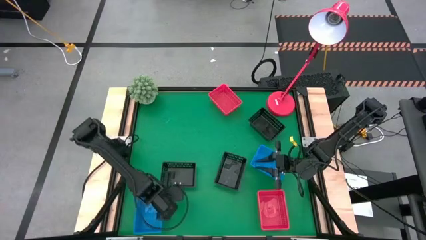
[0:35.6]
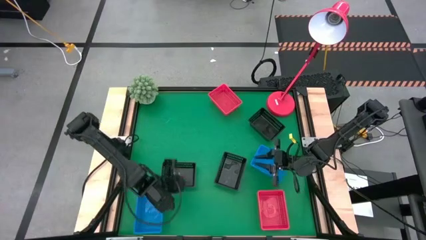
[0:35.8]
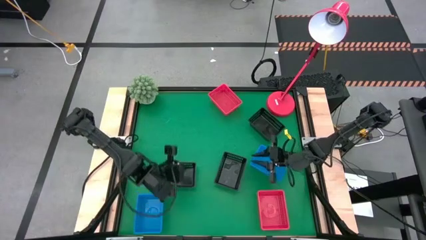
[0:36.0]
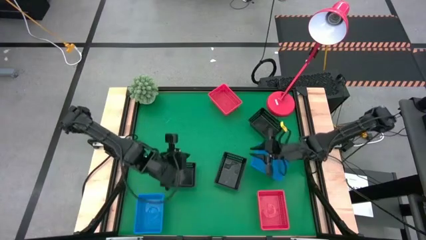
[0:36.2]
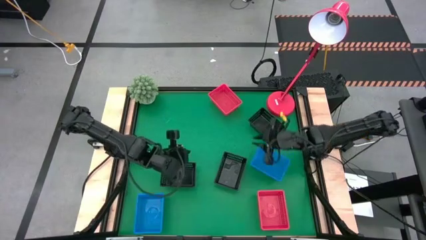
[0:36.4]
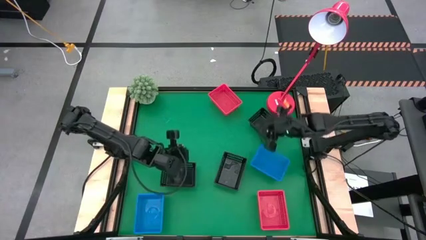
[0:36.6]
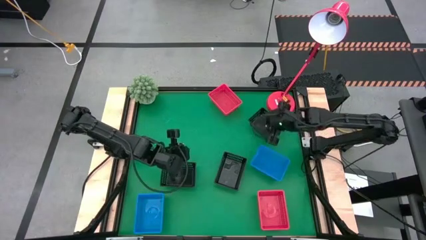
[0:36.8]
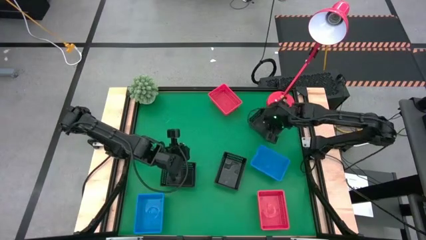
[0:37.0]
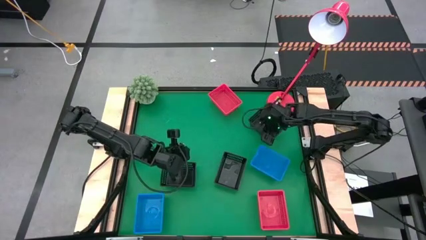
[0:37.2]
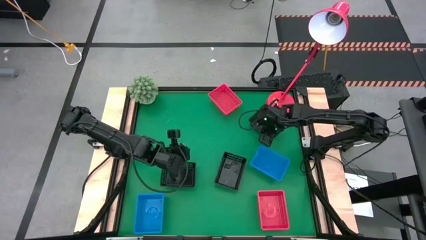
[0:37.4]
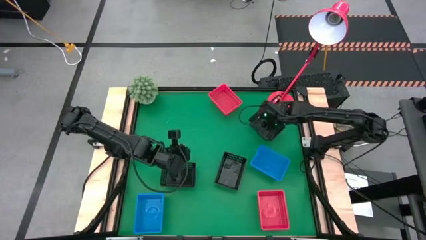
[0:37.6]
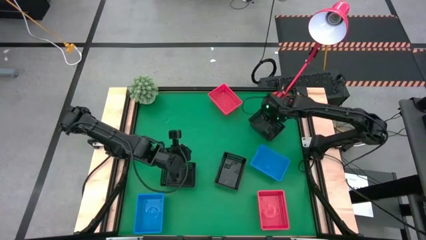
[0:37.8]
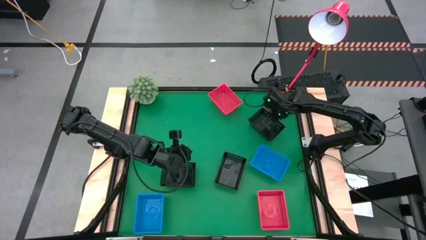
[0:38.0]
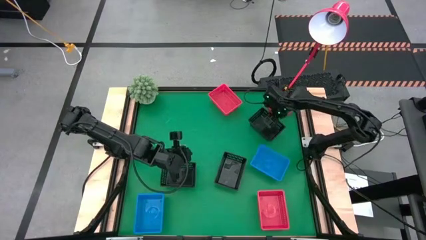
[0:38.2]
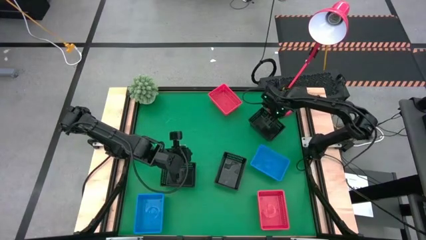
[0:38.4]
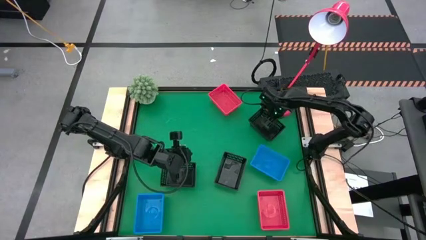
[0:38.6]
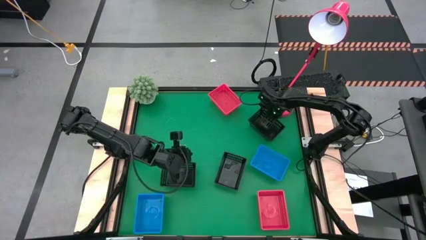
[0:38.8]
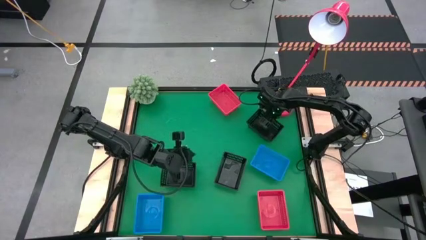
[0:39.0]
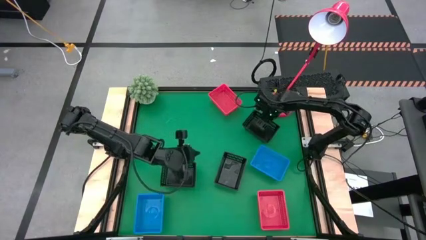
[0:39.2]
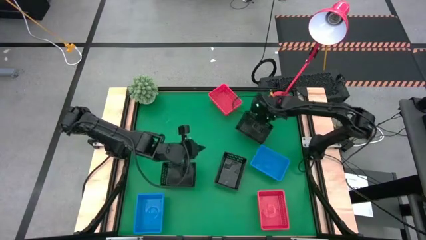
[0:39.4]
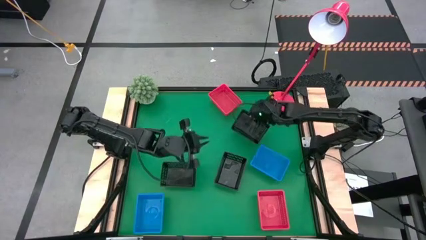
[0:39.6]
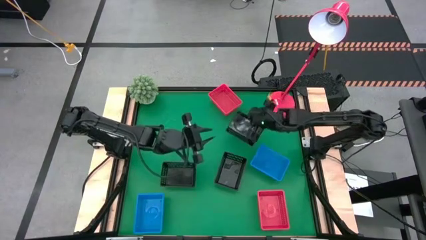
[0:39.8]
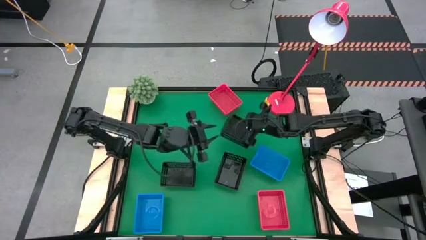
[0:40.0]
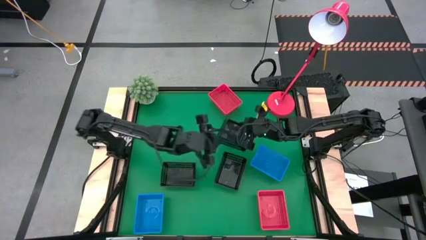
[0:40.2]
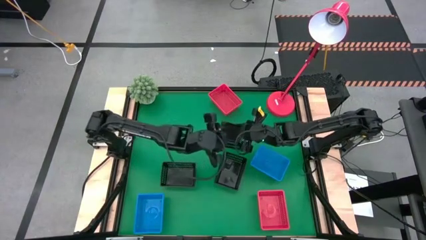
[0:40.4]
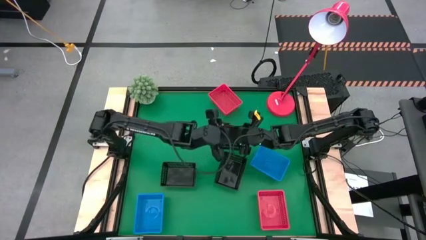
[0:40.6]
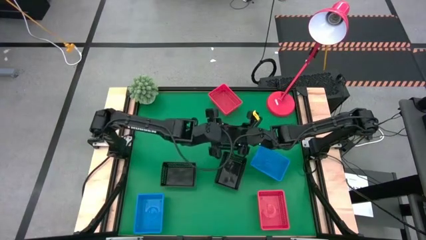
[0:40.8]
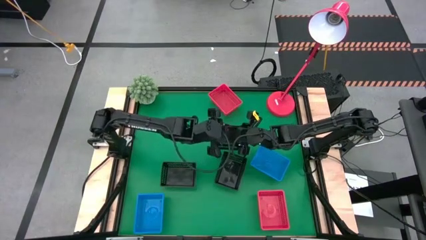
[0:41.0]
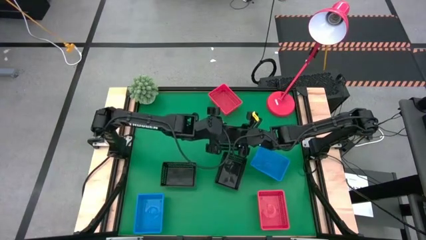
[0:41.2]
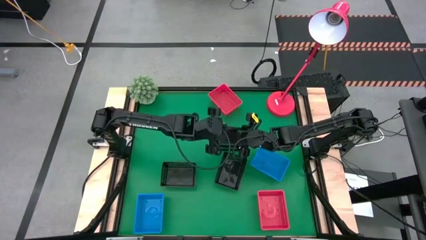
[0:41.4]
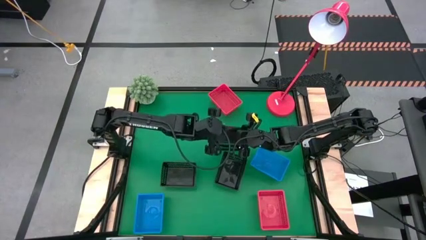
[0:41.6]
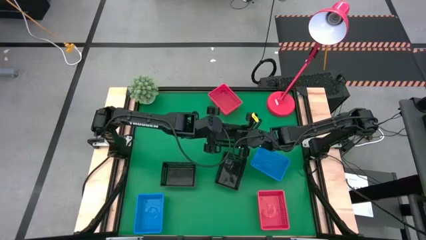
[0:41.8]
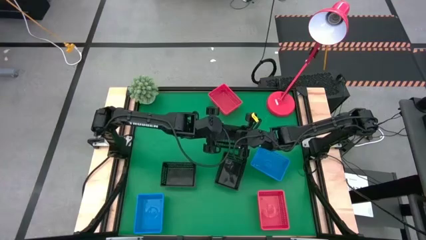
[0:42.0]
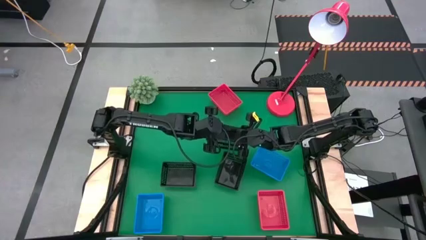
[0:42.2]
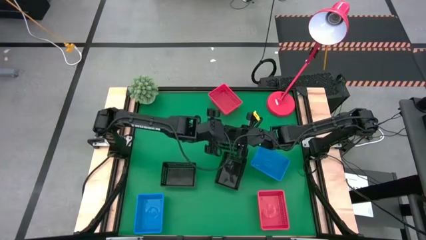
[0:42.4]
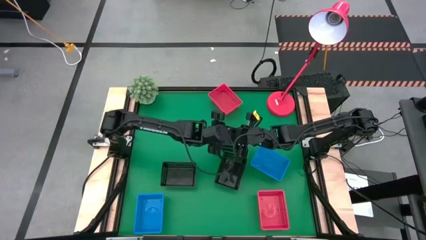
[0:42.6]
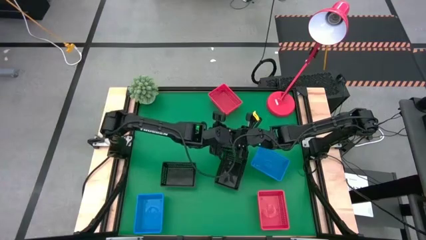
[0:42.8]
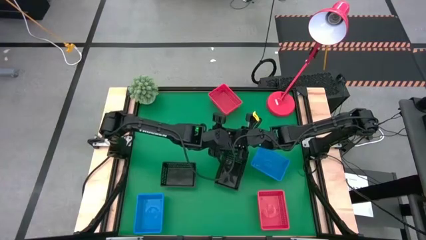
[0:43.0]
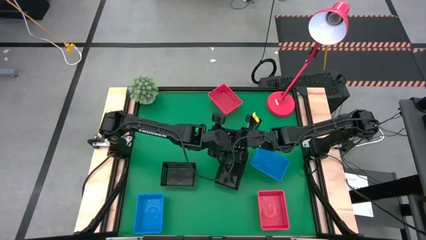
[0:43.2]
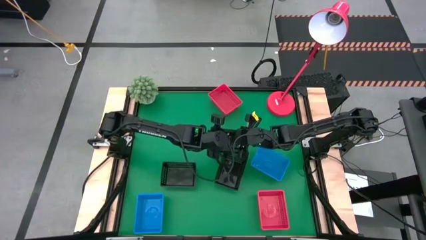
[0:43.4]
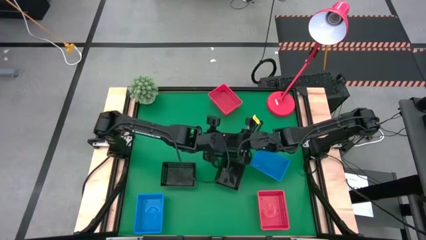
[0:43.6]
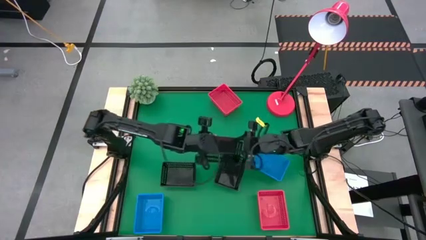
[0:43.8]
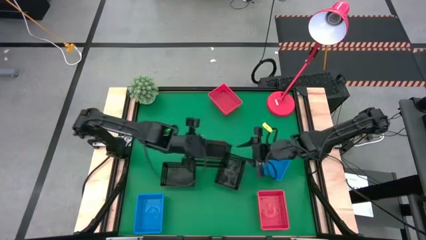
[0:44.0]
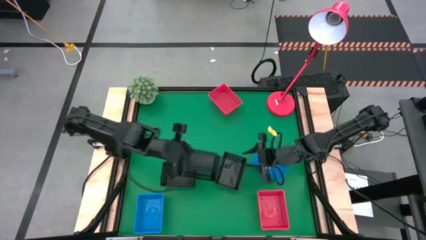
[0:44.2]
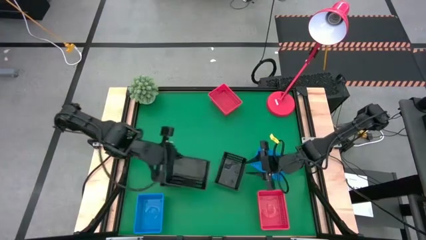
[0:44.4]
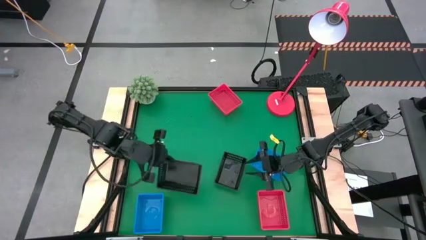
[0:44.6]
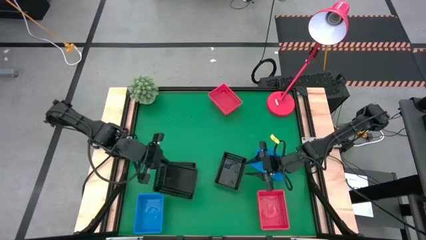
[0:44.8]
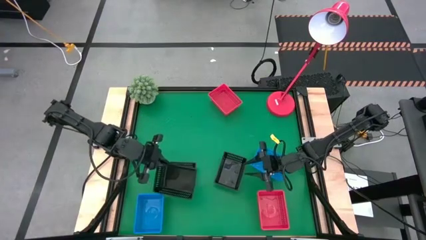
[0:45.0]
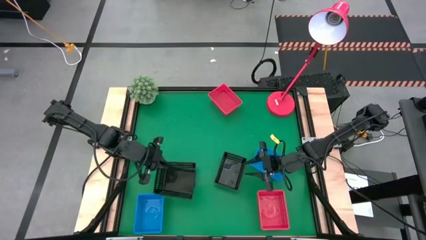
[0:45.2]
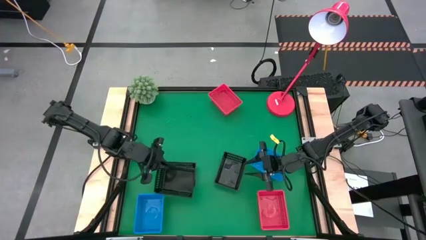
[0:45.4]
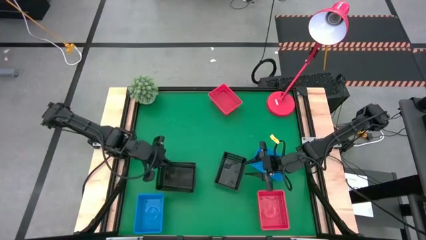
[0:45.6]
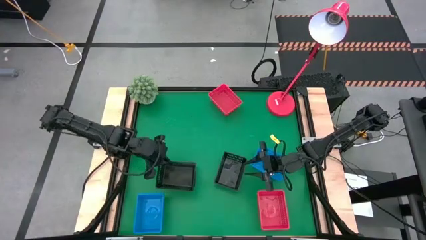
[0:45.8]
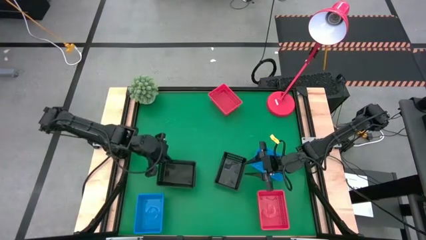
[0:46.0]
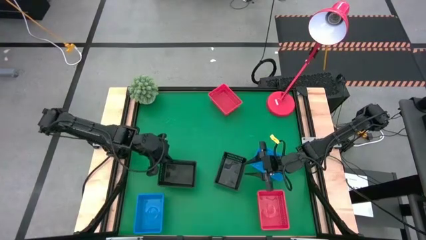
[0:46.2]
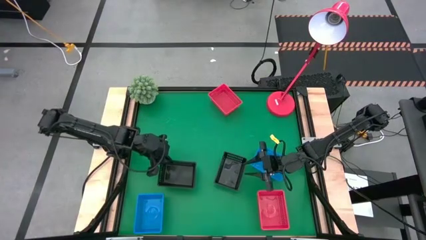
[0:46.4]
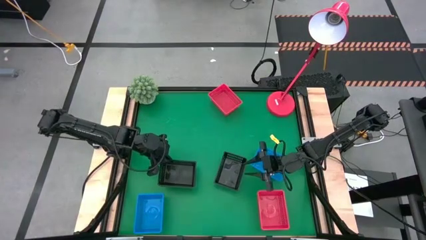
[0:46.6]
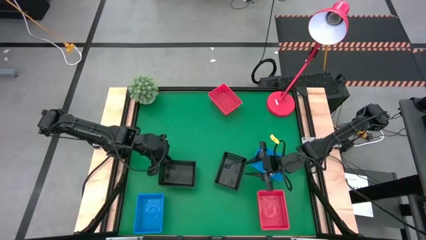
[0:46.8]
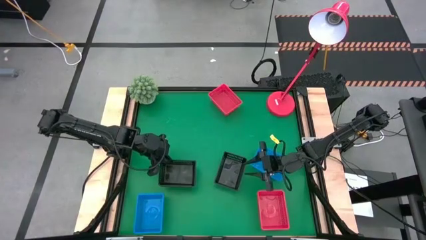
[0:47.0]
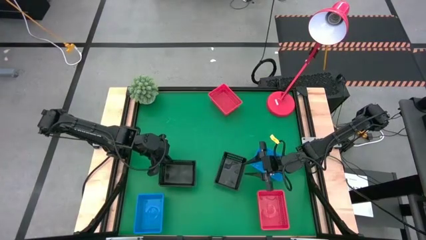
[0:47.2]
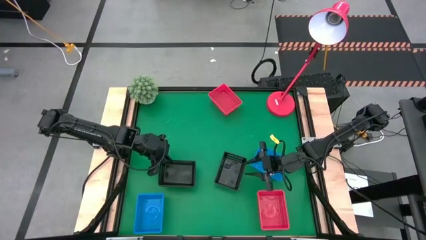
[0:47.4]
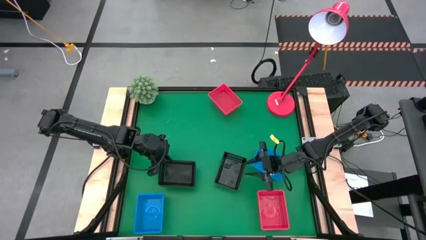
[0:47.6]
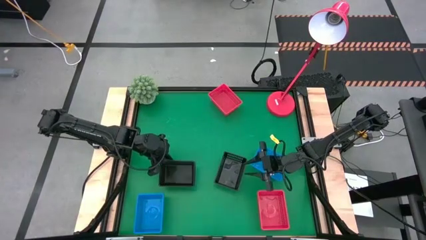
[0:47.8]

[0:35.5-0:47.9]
Stack the top right black bin on the bottom left black bin
